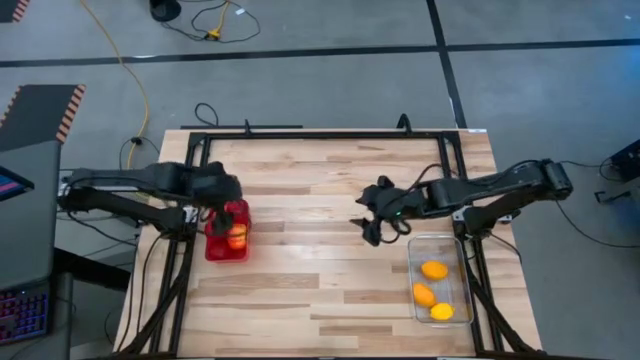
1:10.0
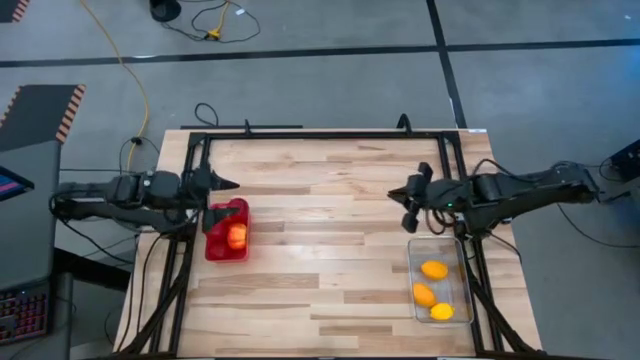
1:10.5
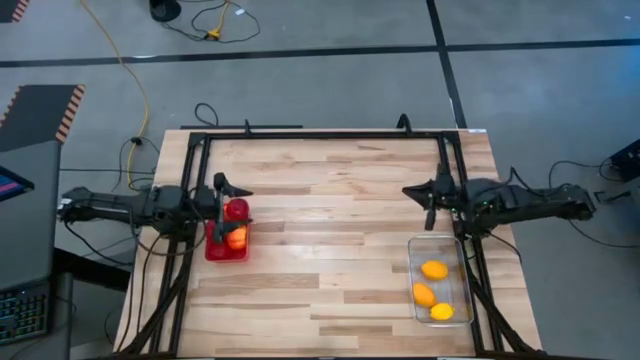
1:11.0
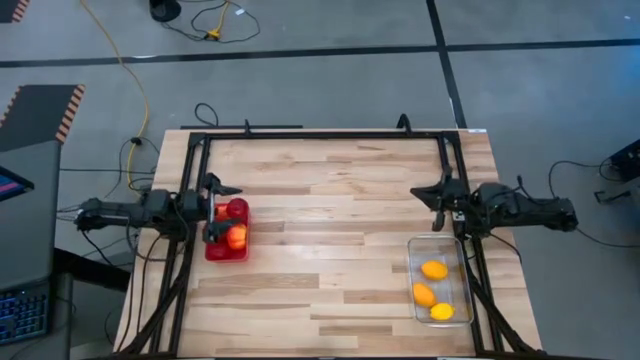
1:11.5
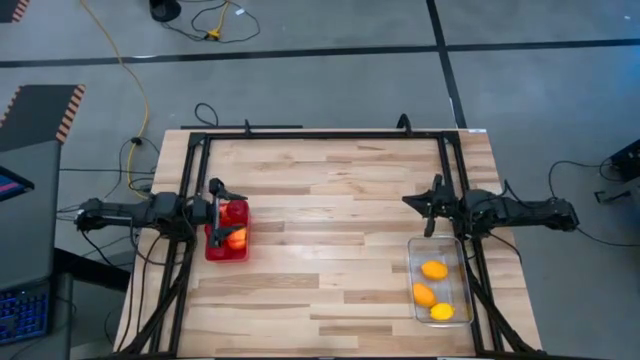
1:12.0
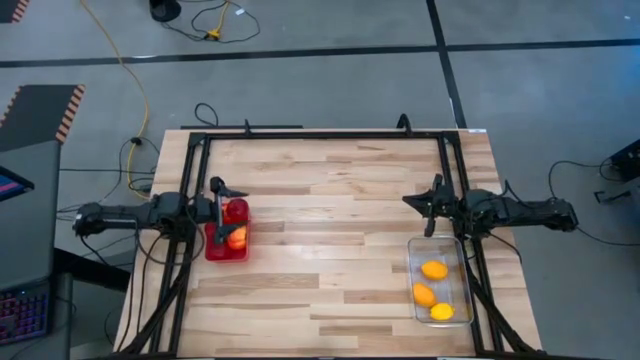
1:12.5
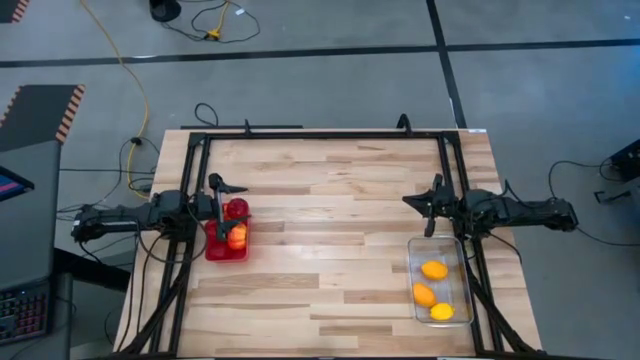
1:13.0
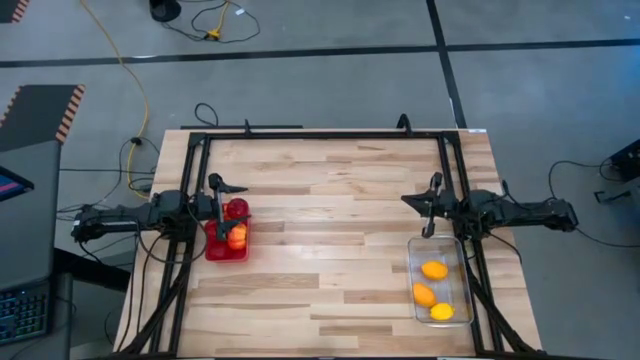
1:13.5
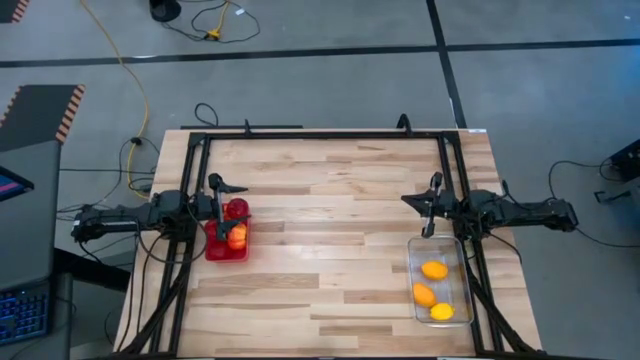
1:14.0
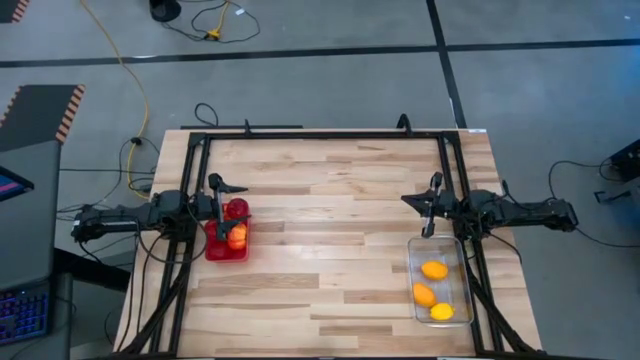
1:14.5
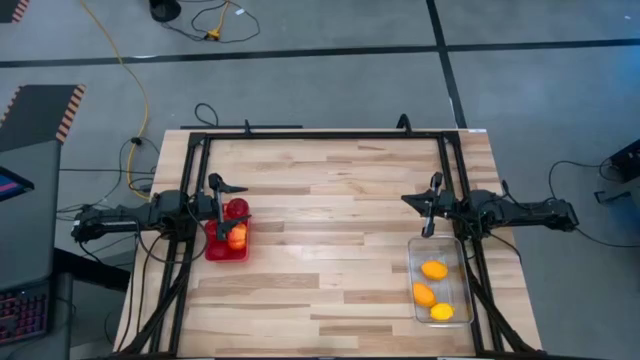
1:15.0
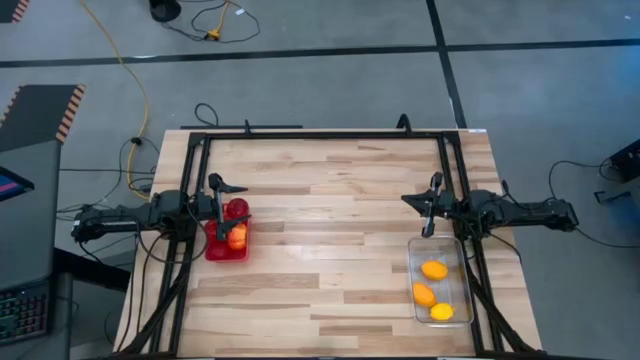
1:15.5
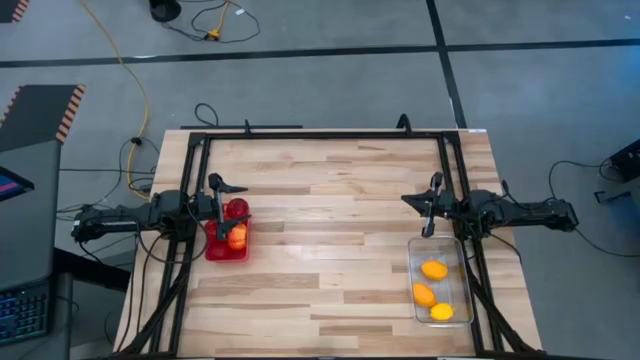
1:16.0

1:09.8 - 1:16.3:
Task: Sort produce into baskets
Return to Home Position

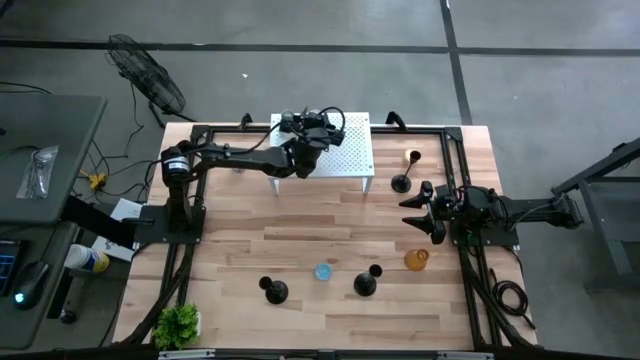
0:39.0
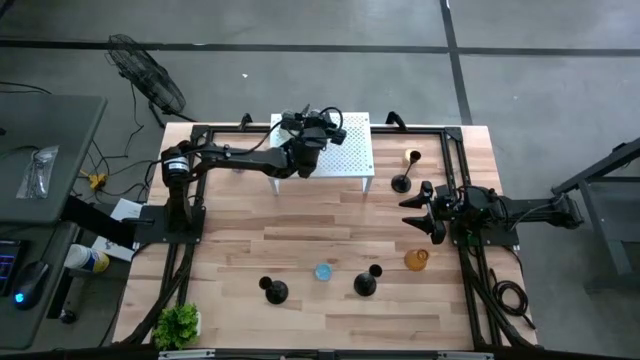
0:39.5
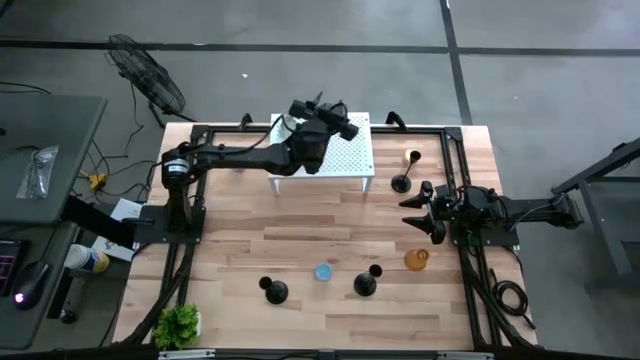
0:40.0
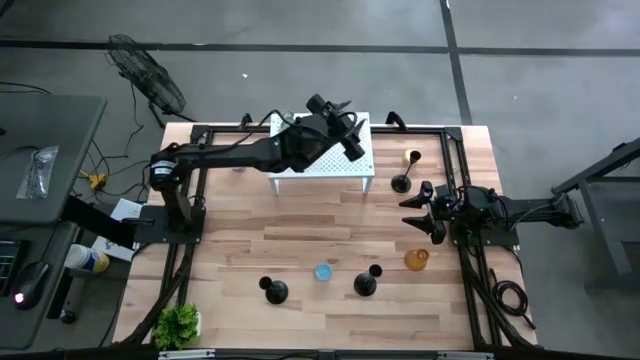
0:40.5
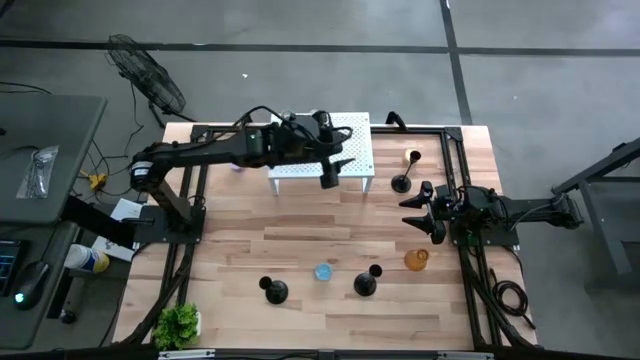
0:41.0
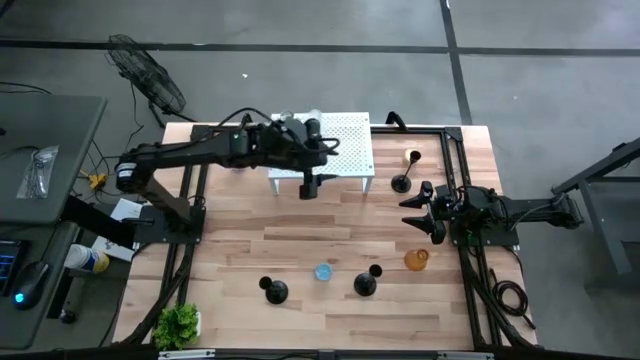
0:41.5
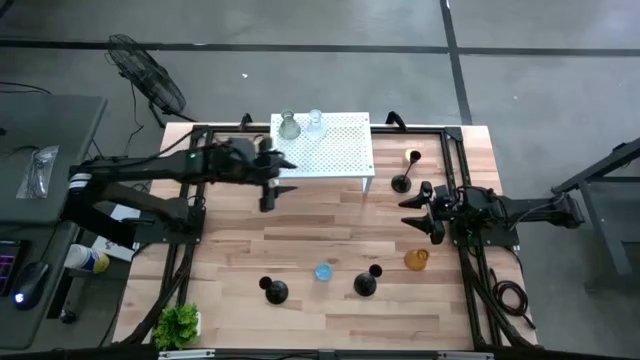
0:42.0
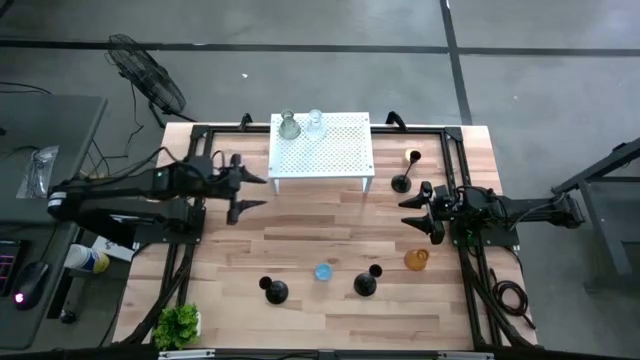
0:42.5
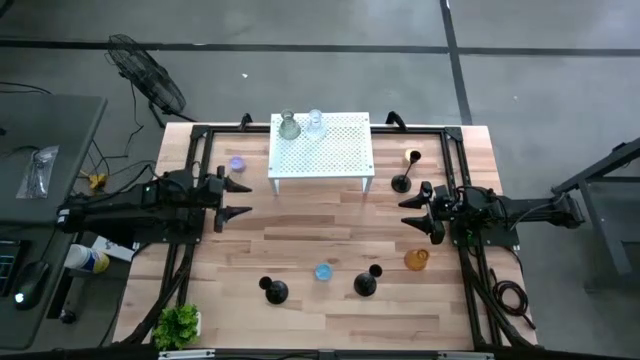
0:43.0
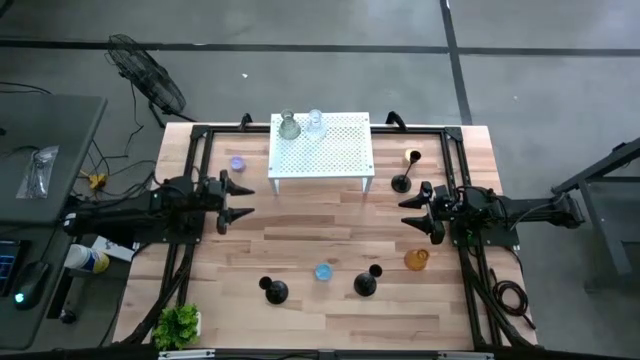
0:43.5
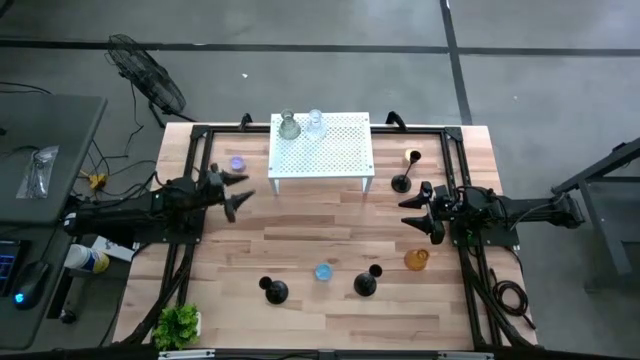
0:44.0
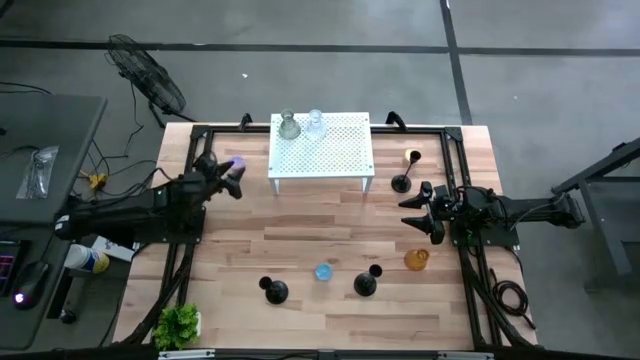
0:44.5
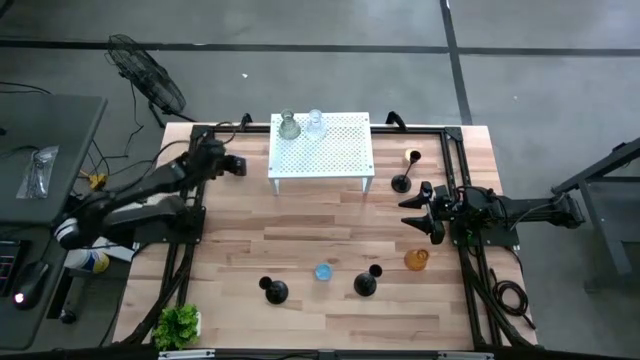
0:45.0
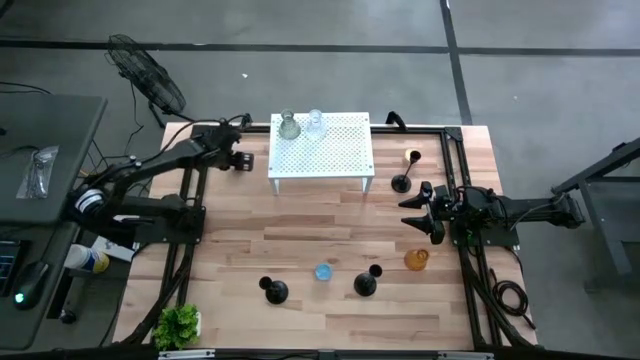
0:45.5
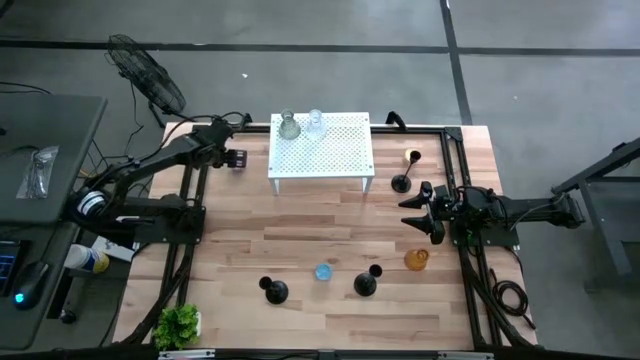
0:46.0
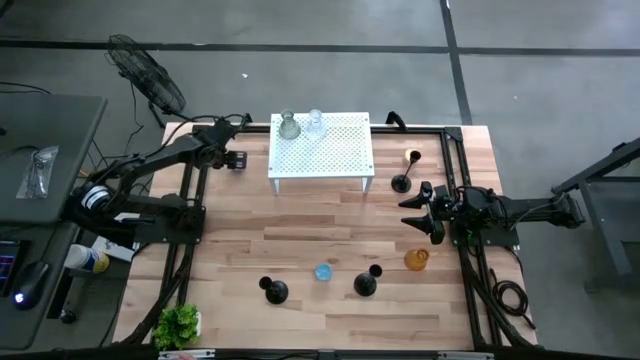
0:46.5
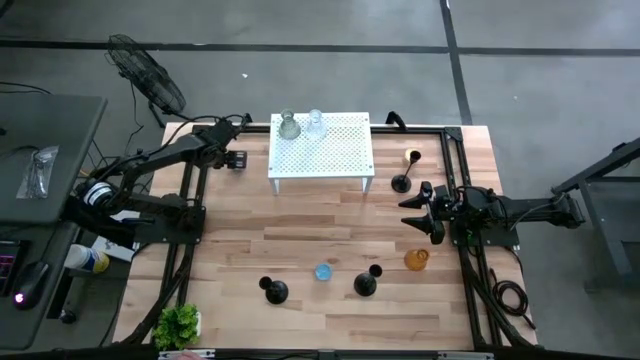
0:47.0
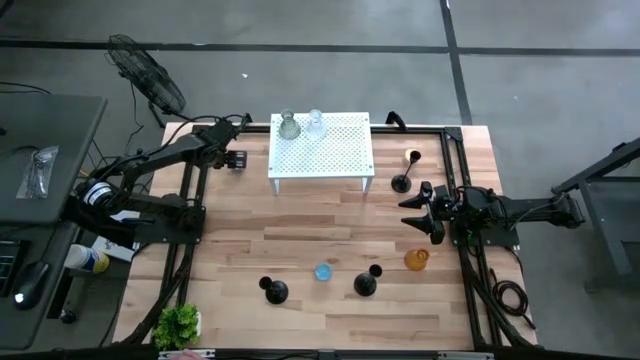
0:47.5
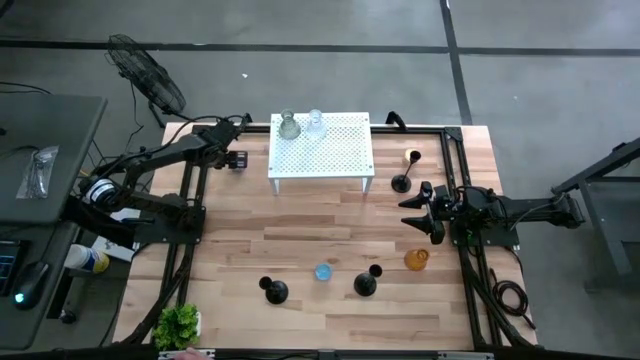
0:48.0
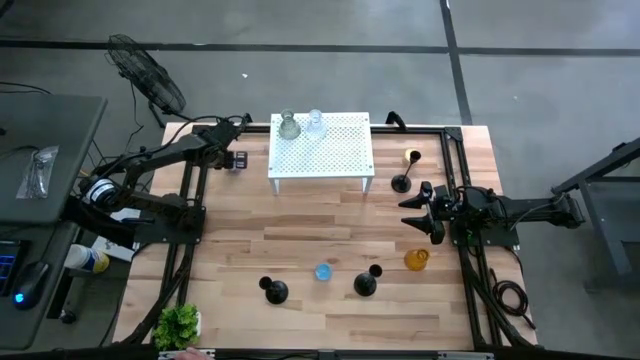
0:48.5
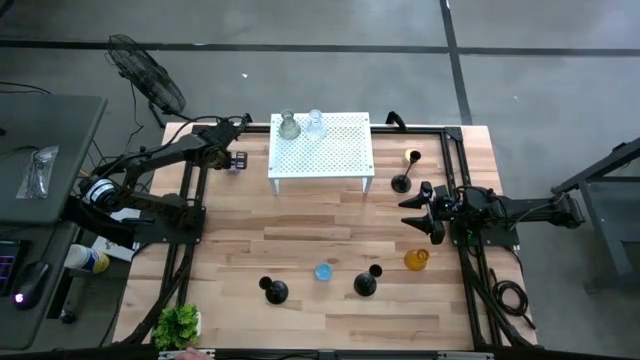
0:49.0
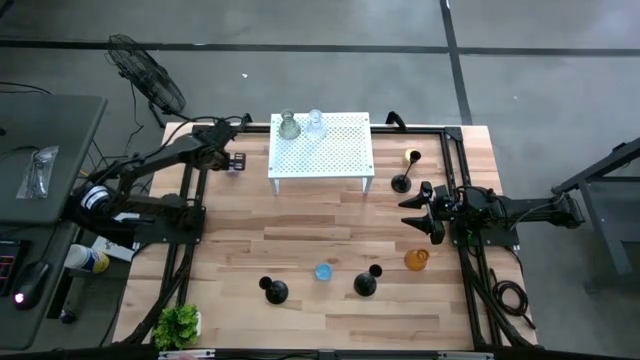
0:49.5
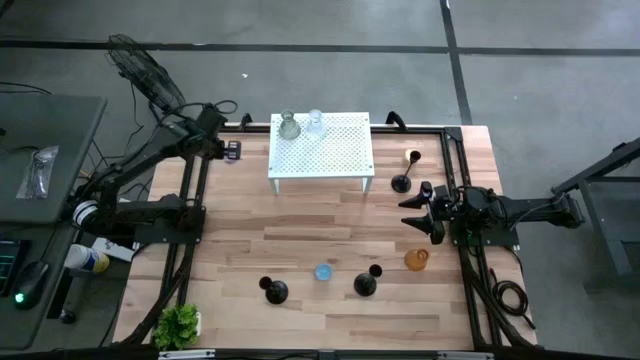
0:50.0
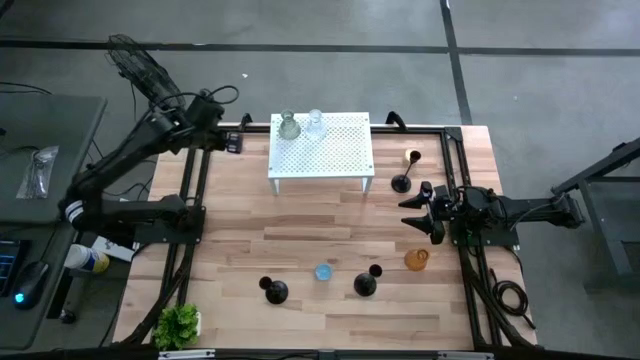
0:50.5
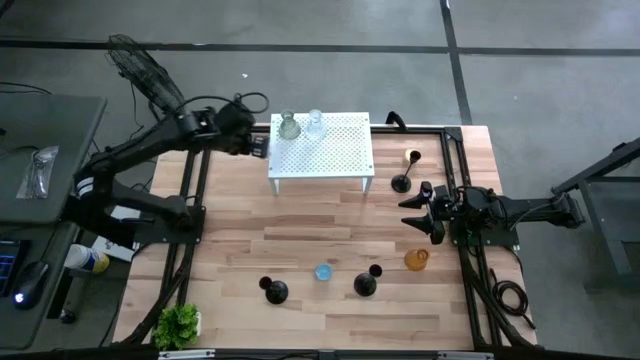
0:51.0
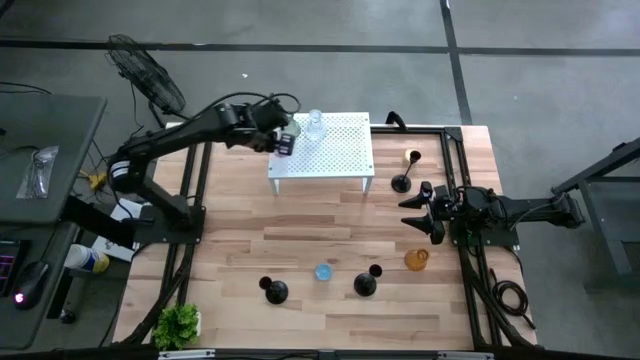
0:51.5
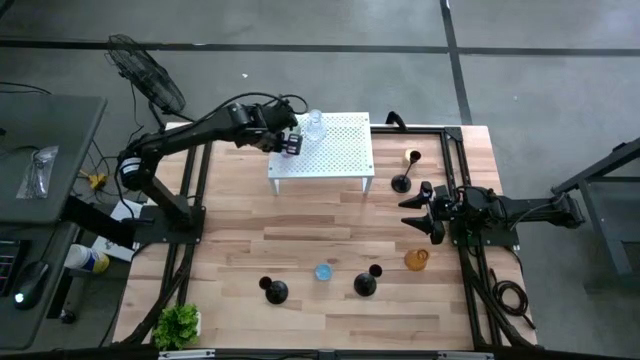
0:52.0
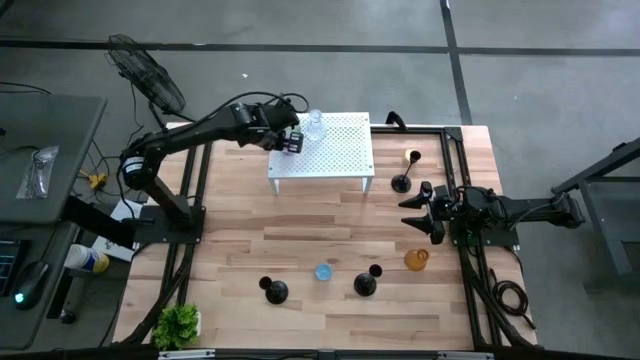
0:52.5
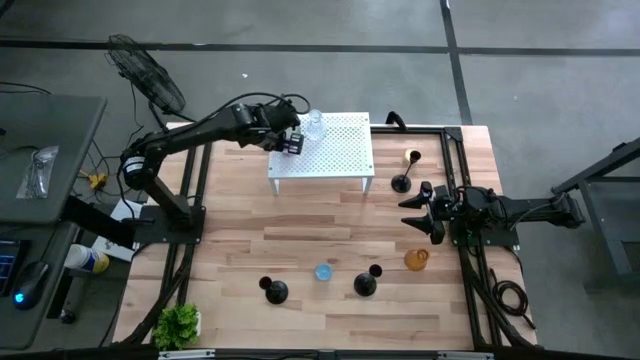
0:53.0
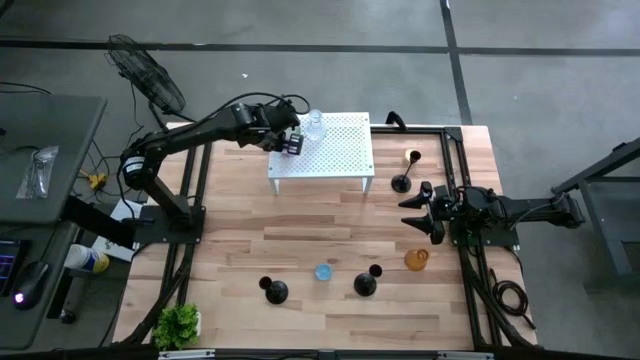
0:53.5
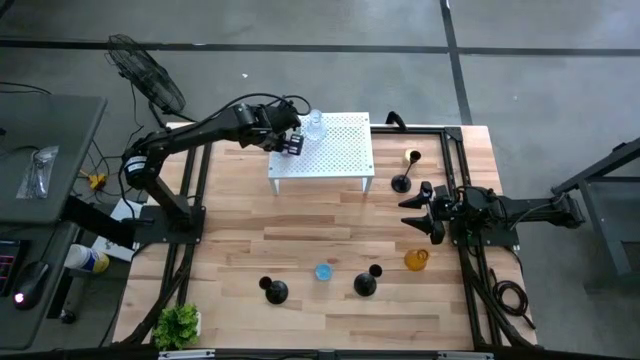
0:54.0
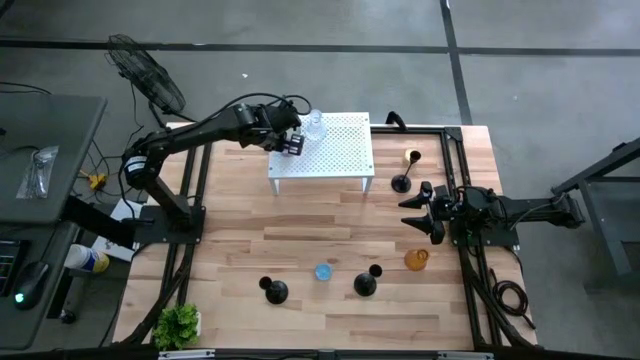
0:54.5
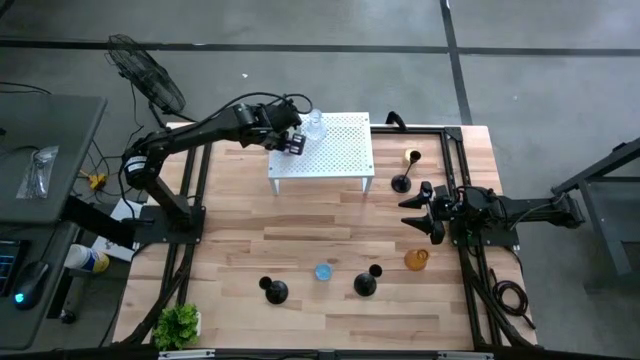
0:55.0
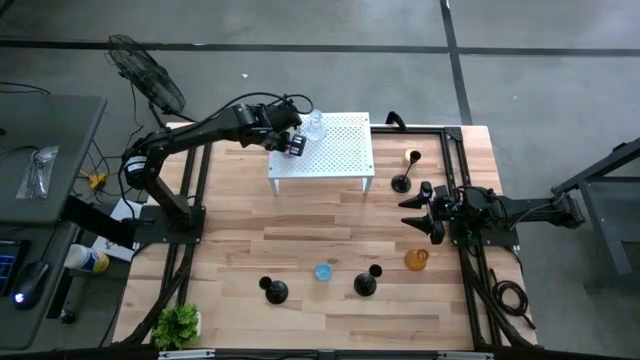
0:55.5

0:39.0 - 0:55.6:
Task: Pick & Place candle stick holders
Put the purple scented candle on the shelf
